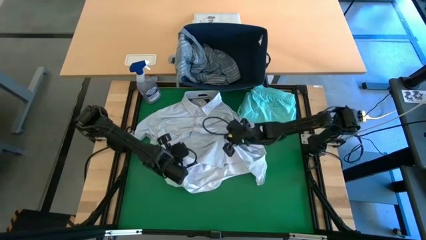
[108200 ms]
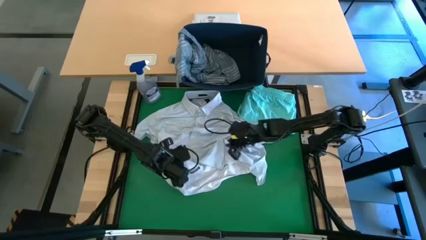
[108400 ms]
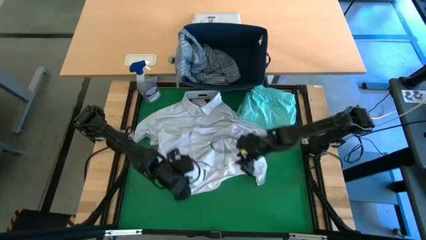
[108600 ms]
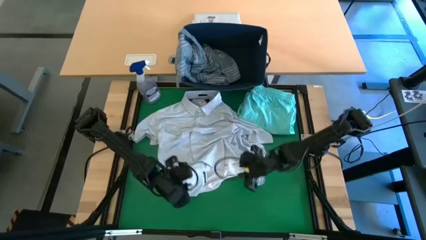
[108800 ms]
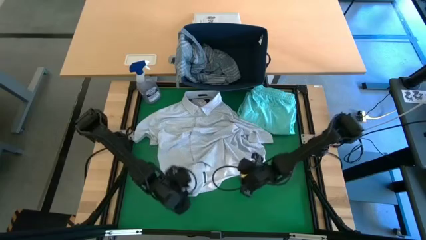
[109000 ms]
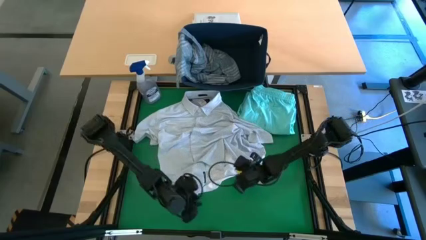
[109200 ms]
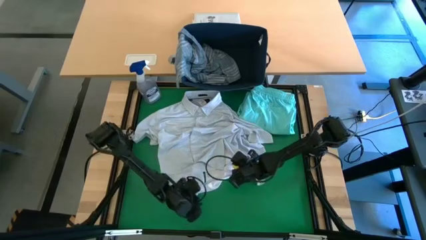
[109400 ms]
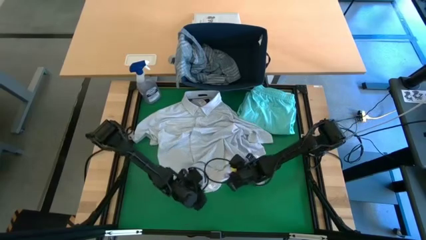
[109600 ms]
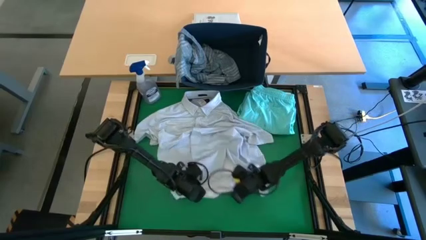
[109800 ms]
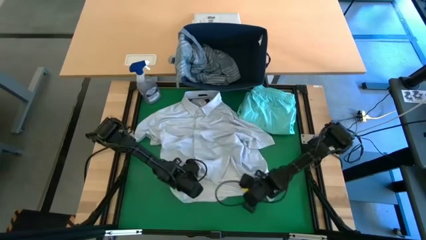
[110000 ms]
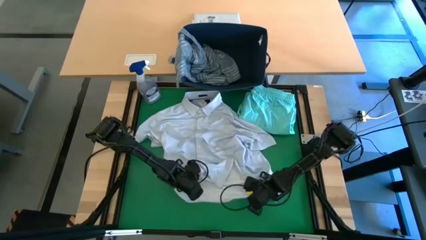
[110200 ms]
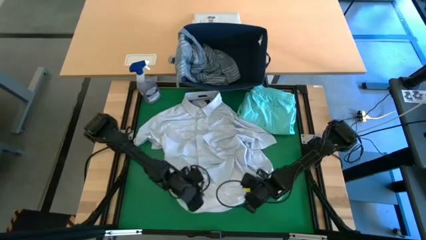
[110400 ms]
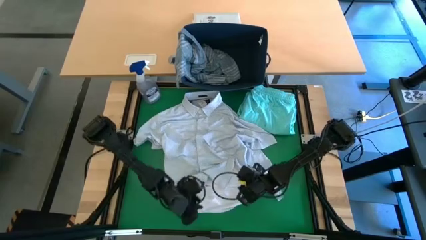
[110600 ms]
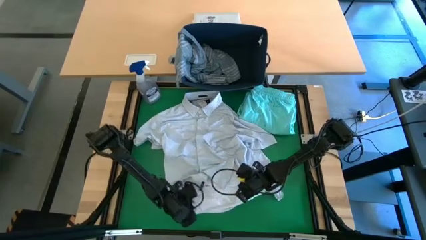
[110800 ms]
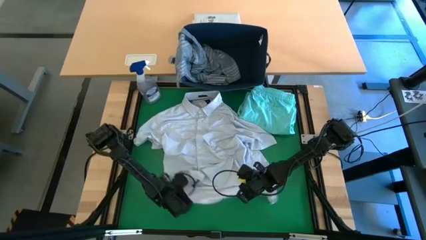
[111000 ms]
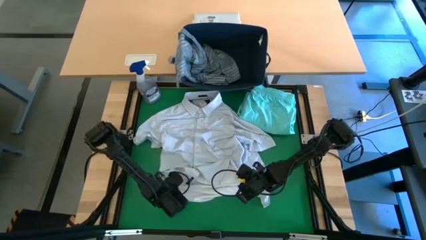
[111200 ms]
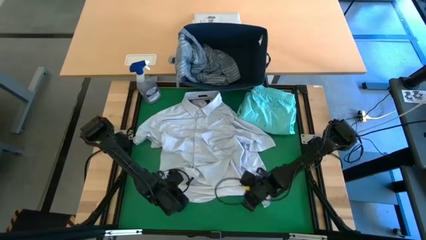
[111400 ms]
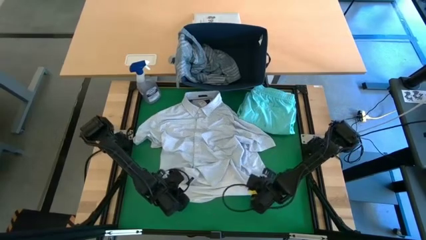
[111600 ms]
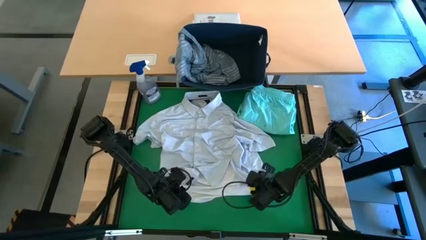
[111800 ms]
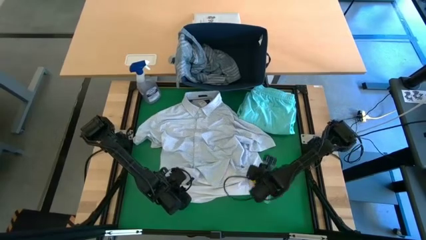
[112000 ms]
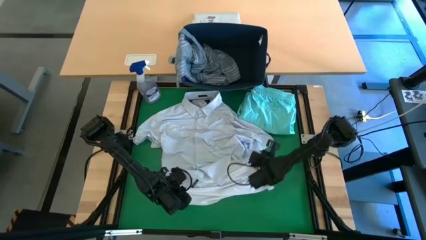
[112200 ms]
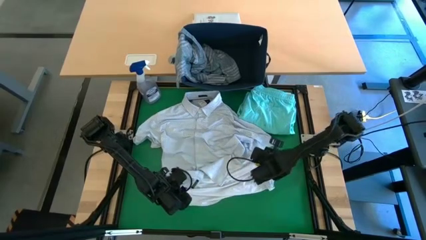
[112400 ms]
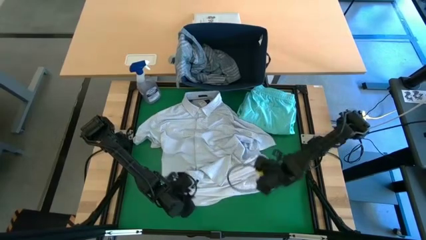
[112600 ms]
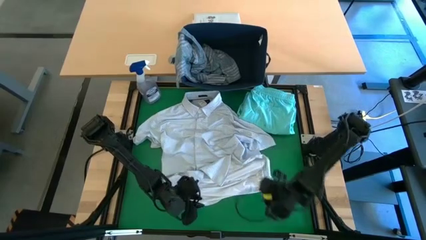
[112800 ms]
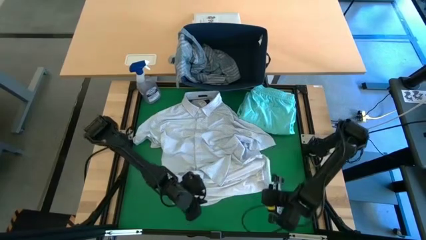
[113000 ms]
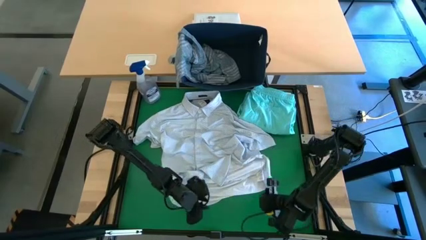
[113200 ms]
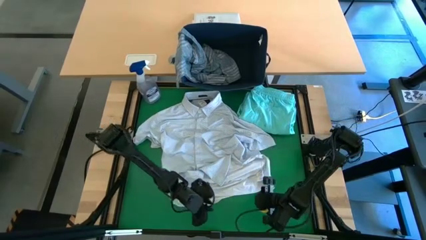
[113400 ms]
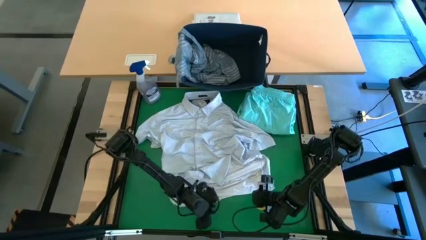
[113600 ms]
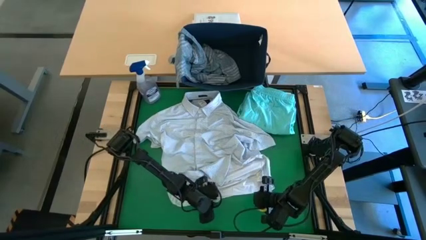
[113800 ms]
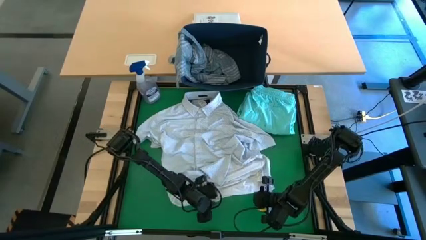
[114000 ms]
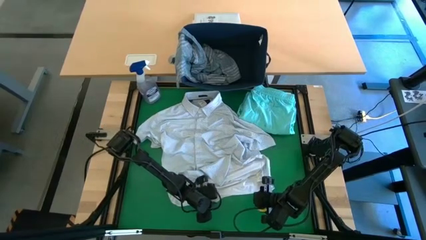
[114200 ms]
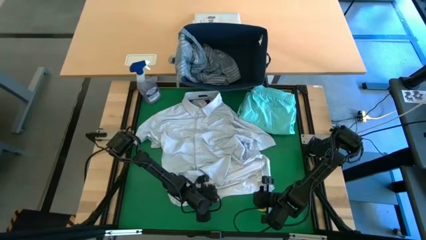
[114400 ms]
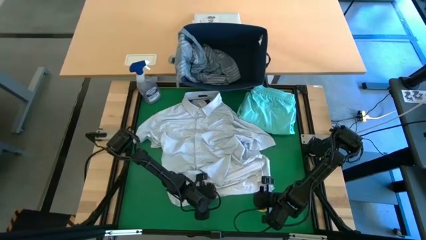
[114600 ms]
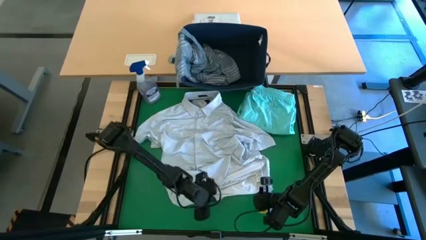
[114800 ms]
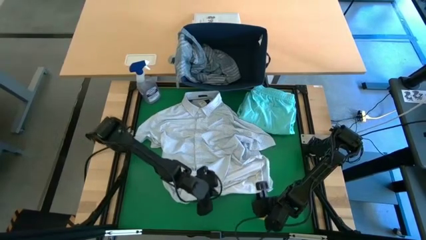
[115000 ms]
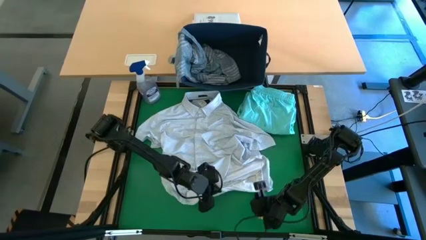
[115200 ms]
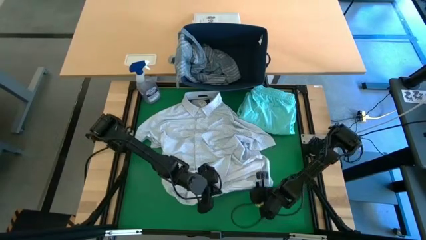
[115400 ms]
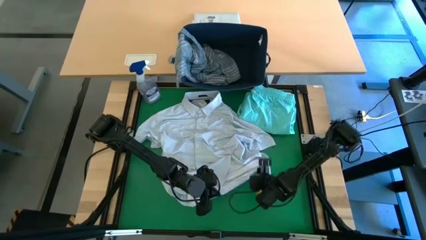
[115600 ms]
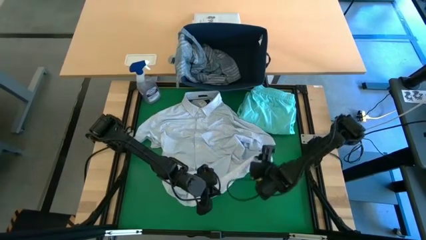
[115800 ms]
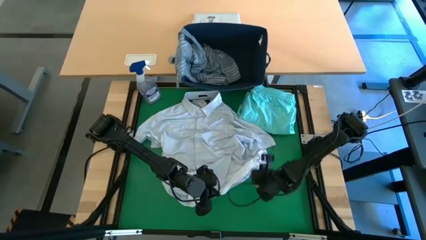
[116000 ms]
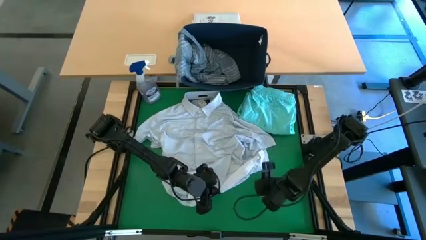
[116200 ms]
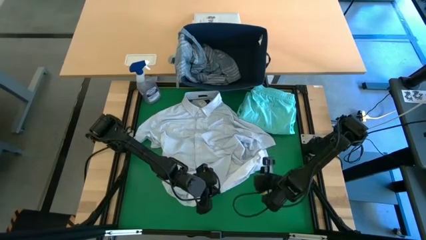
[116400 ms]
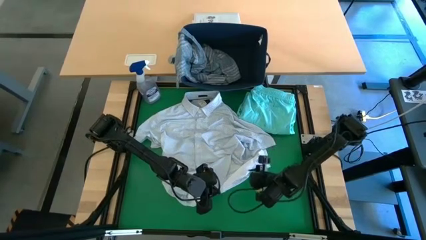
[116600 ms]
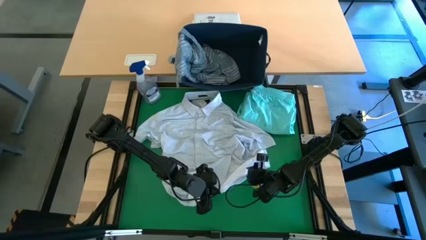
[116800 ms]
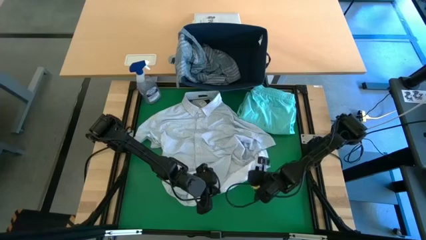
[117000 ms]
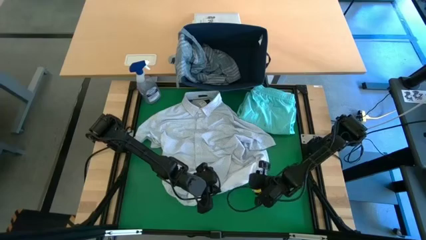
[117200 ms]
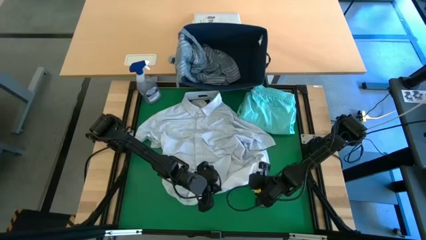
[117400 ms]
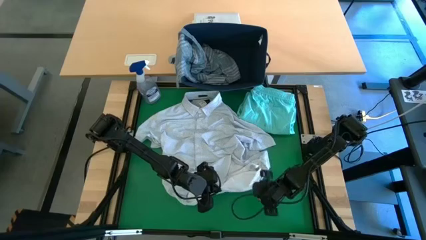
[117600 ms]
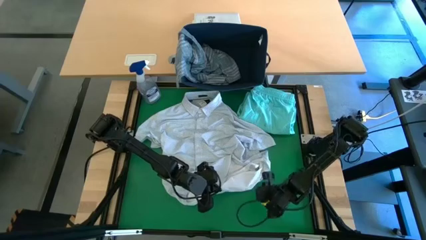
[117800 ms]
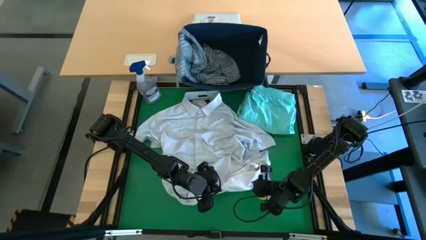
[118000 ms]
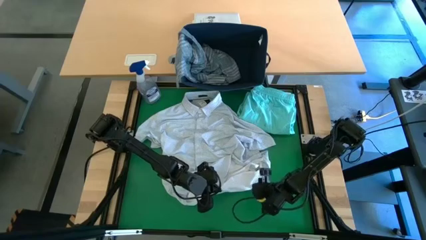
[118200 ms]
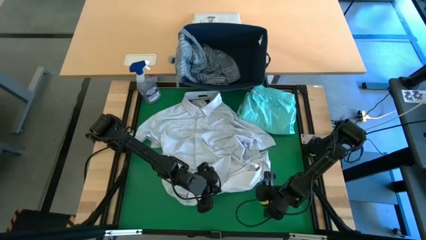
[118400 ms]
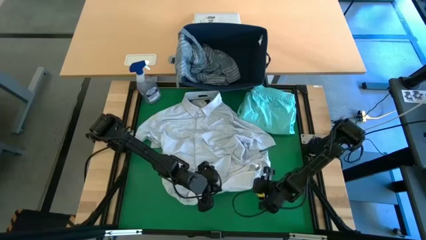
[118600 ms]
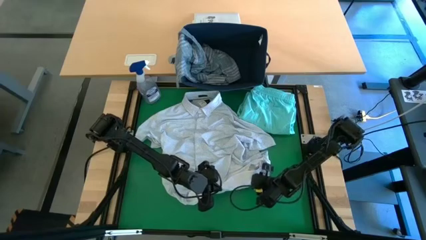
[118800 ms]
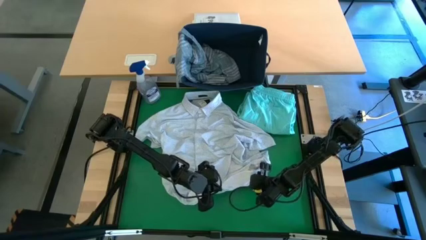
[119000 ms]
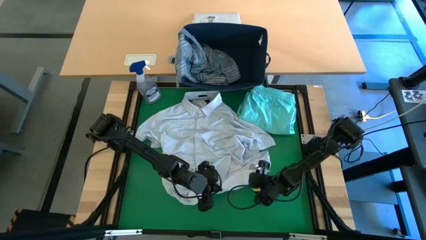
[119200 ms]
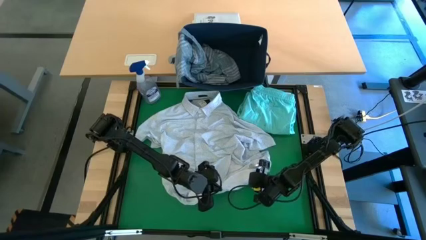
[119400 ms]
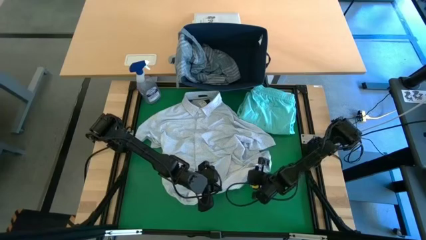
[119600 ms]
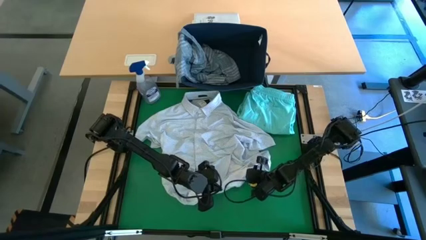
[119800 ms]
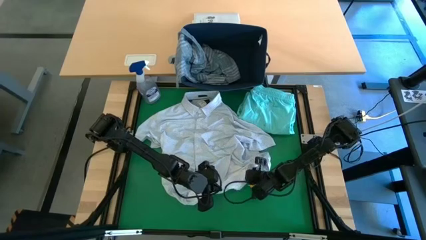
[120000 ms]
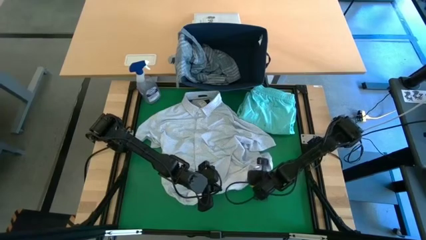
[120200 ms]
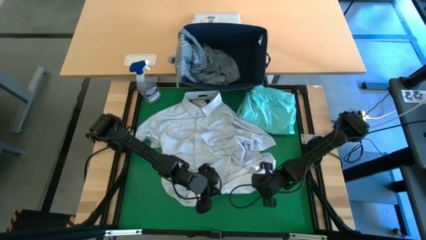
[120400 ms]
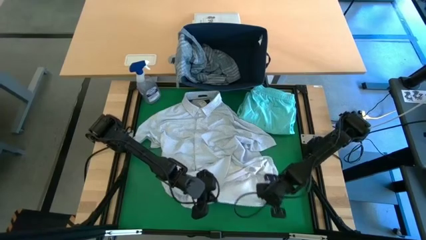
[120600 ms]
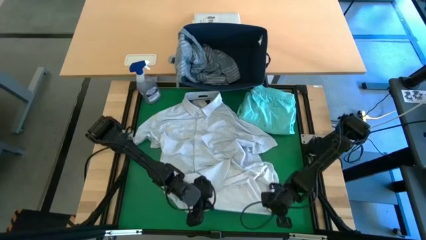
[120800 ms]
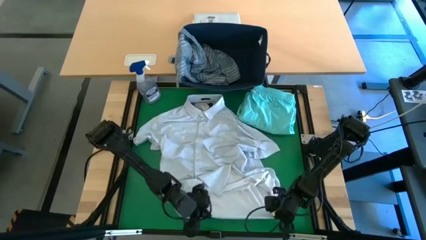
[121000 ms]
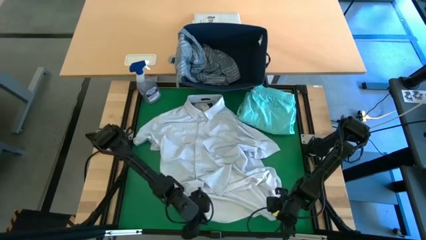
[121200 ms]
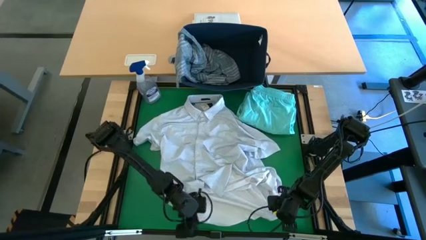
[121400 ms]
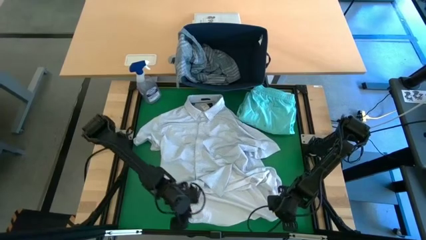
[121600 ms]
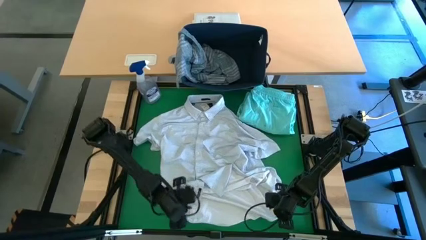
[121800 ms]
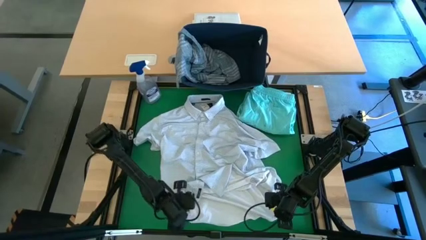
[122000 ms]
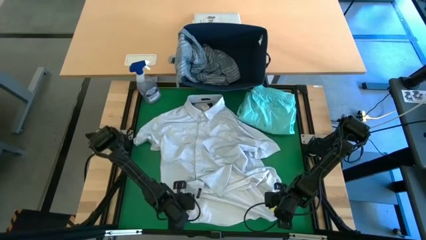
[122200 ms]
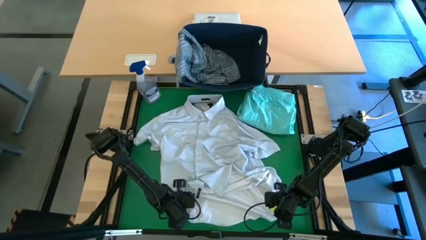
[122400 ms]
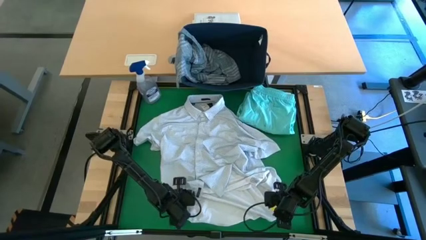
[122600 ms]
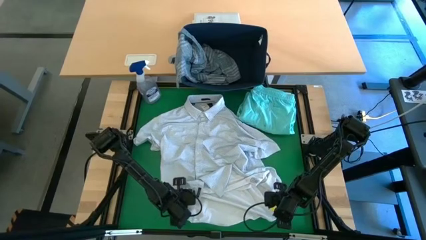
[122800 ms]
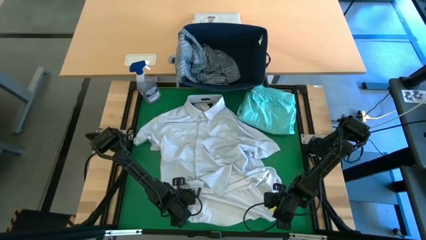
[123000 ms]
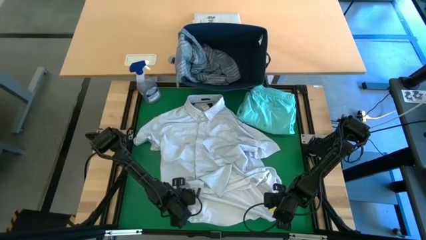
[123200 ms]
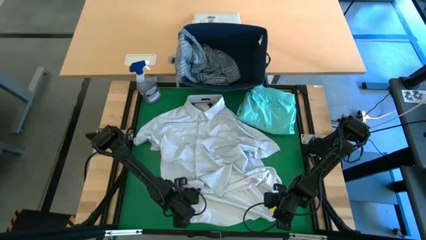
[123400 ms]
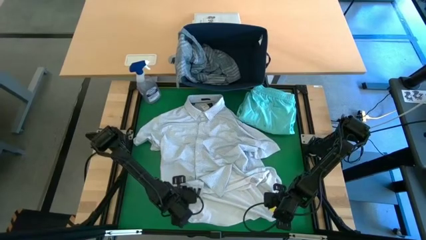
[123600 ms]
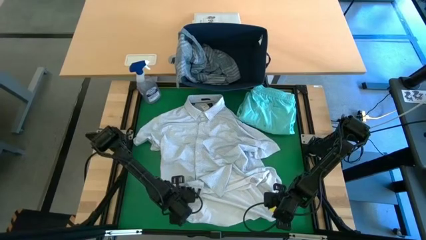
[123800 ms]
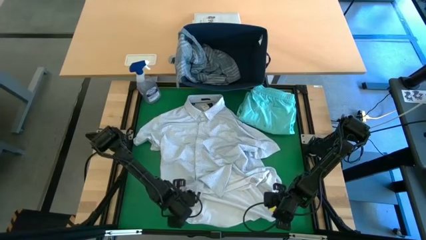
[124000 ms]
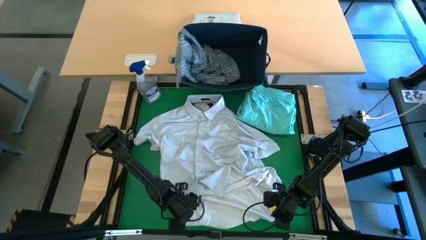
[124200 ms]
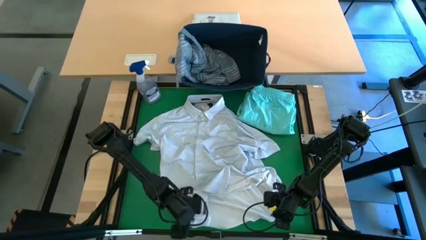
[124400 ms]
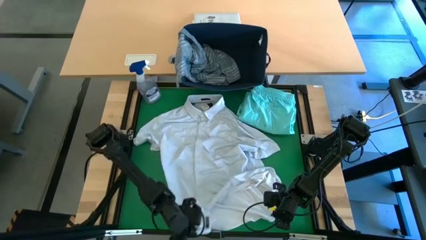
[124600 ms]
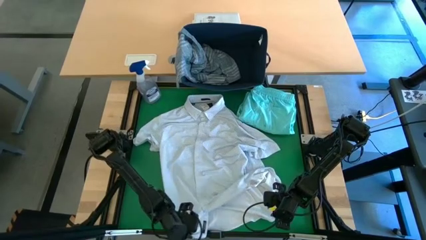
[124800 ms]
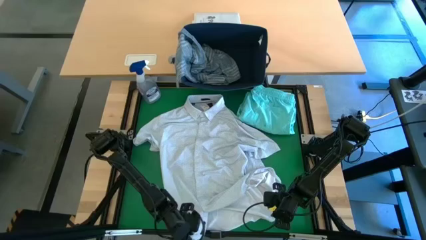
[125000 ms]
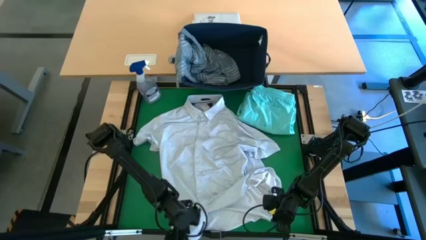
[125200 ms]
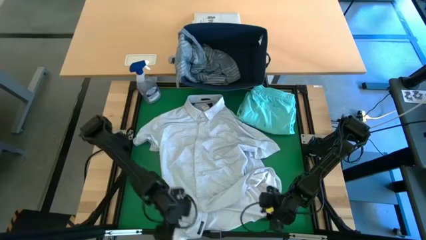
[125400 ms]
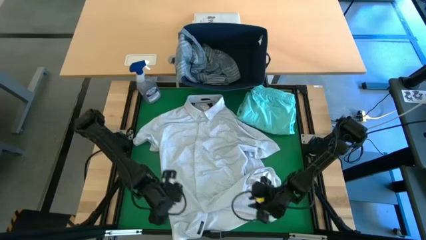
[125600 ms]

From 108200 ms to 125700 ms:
Task: Fold laundry
Fold the white polo shirt
